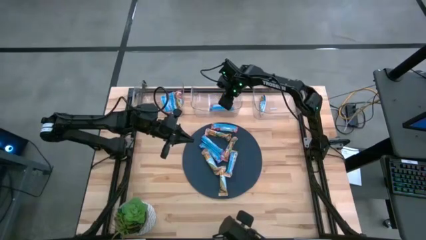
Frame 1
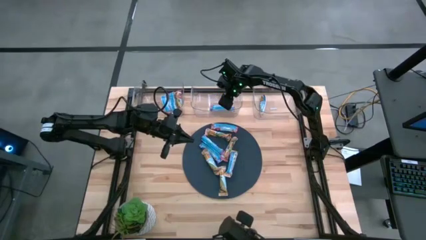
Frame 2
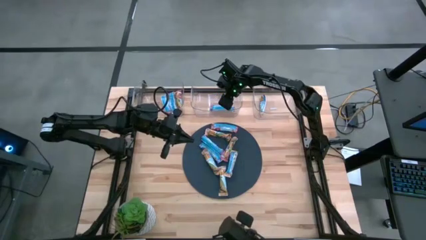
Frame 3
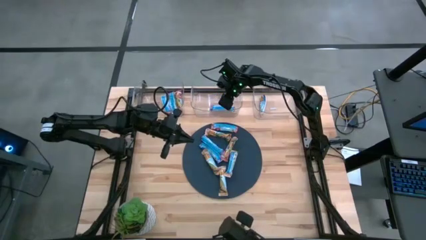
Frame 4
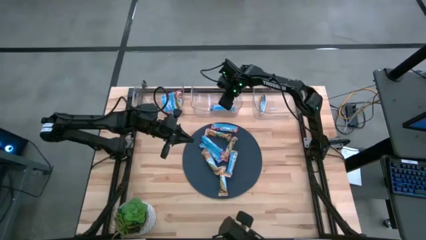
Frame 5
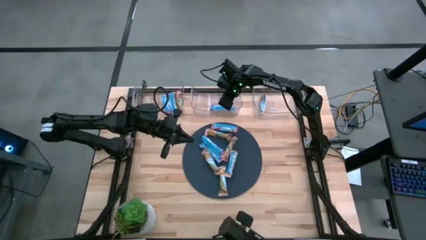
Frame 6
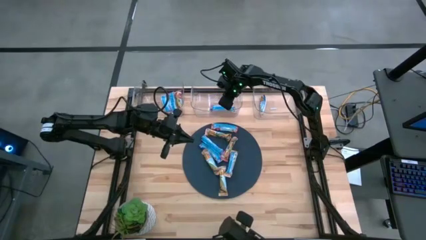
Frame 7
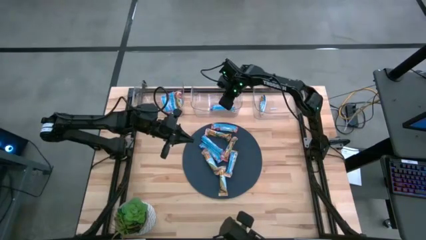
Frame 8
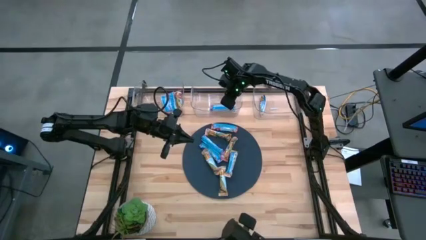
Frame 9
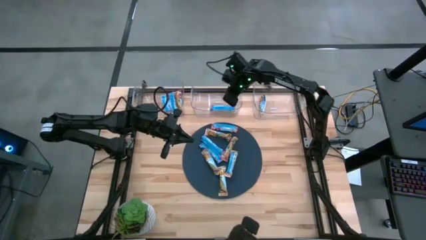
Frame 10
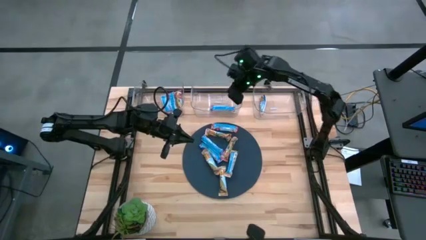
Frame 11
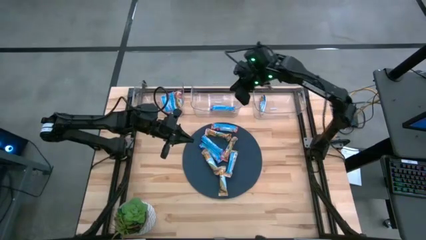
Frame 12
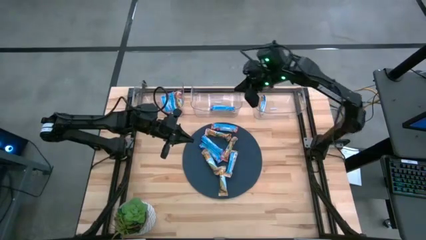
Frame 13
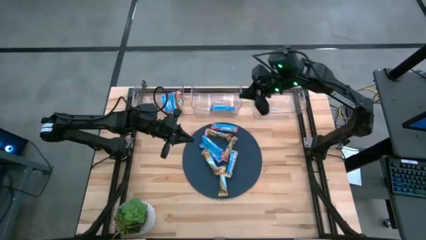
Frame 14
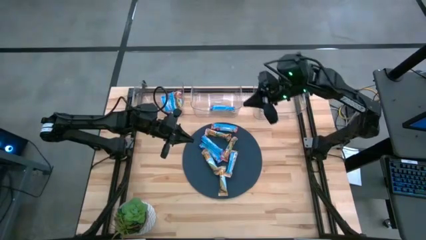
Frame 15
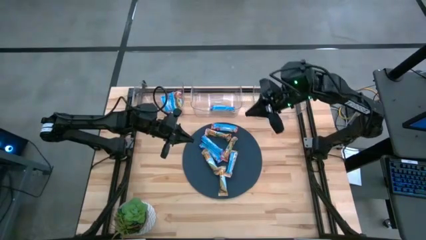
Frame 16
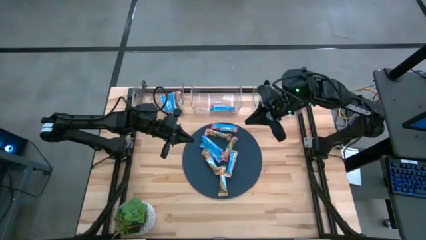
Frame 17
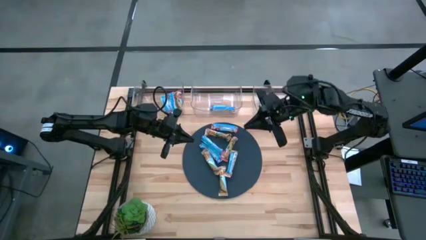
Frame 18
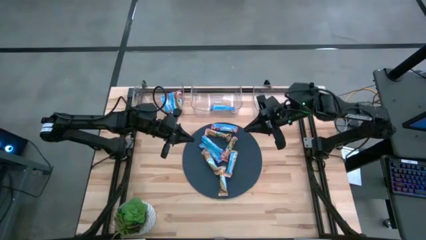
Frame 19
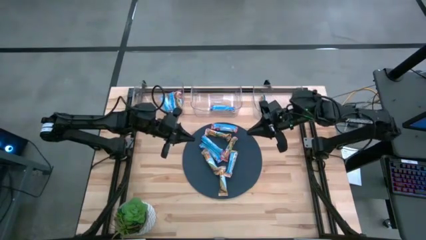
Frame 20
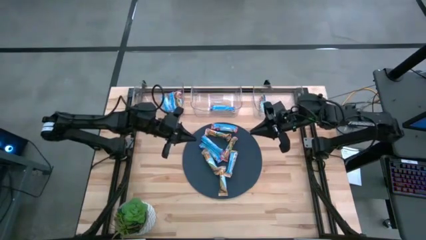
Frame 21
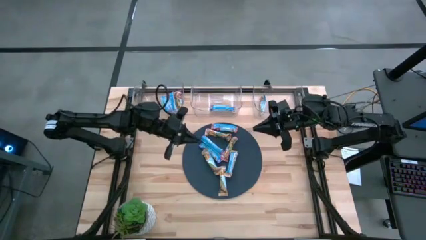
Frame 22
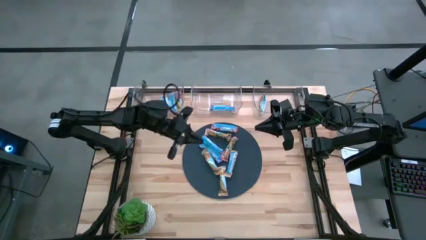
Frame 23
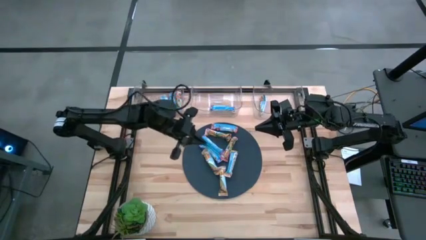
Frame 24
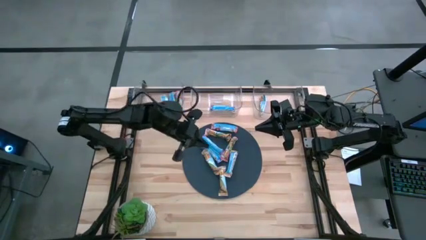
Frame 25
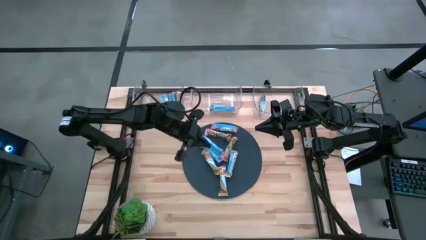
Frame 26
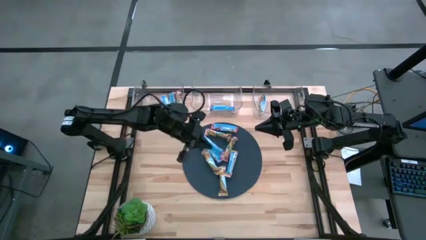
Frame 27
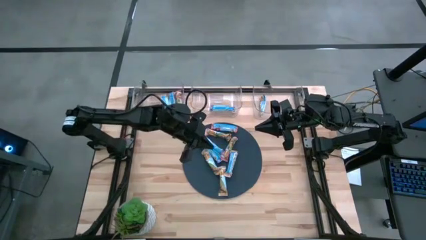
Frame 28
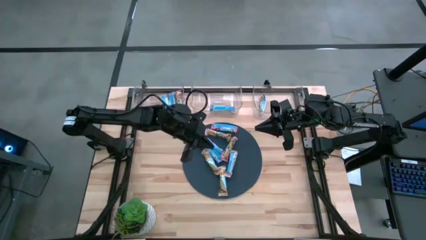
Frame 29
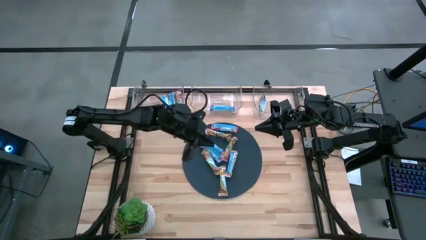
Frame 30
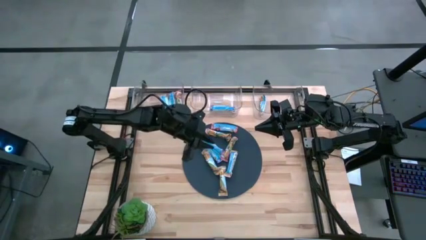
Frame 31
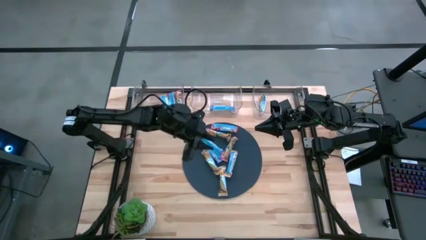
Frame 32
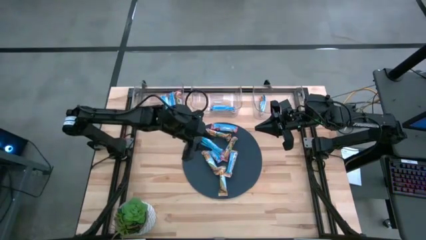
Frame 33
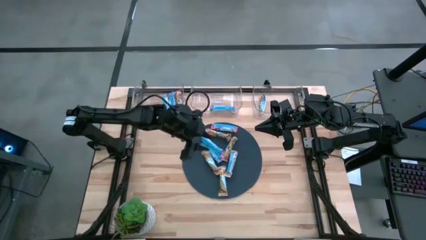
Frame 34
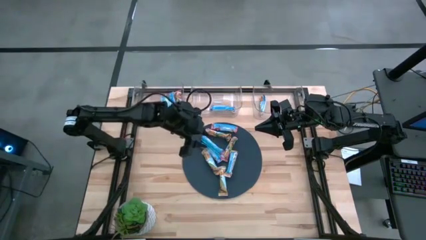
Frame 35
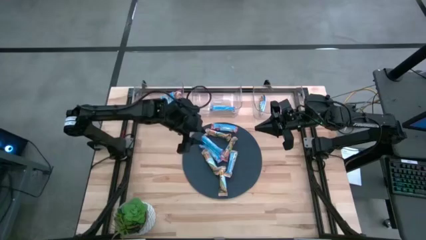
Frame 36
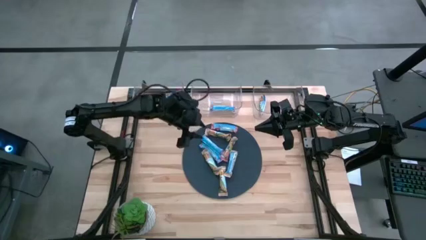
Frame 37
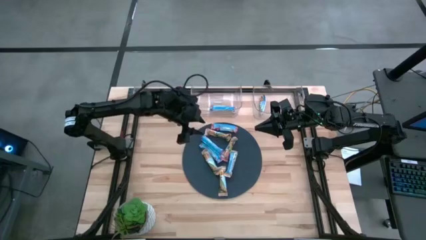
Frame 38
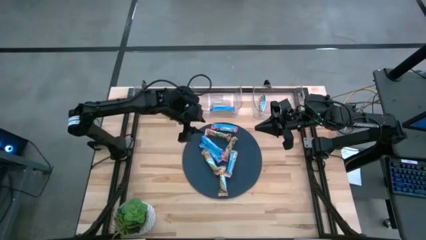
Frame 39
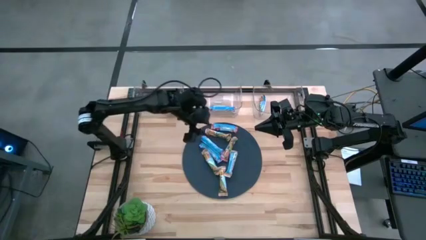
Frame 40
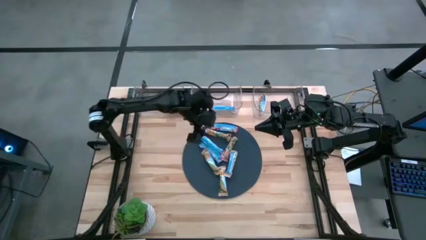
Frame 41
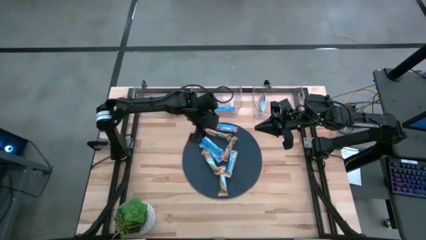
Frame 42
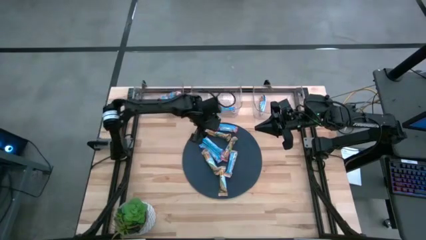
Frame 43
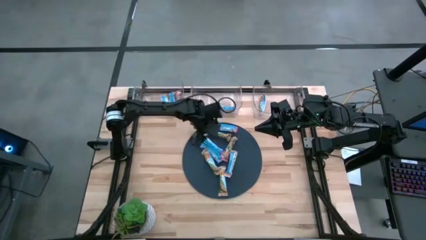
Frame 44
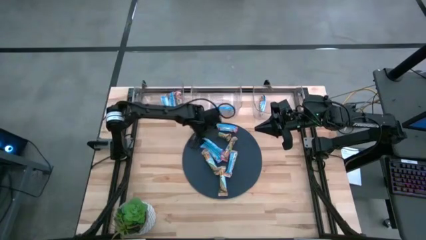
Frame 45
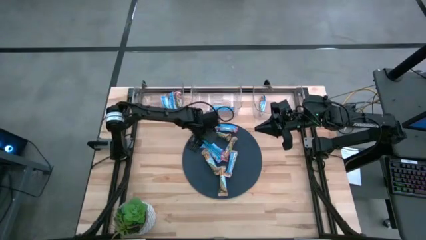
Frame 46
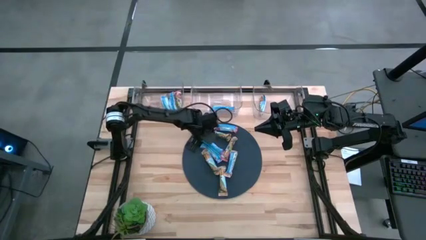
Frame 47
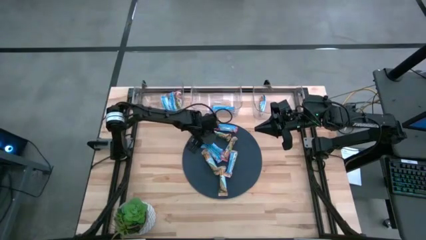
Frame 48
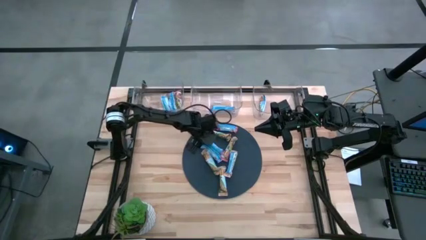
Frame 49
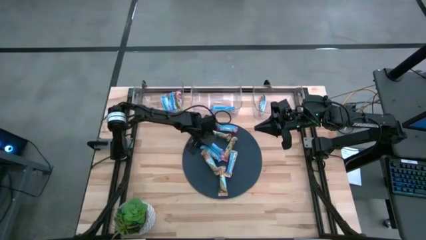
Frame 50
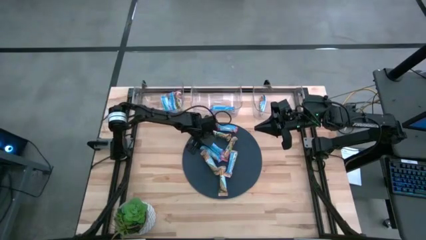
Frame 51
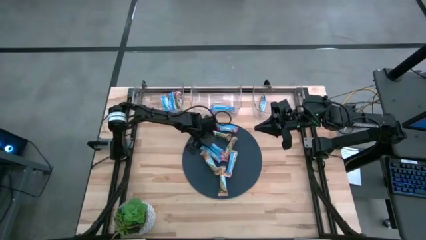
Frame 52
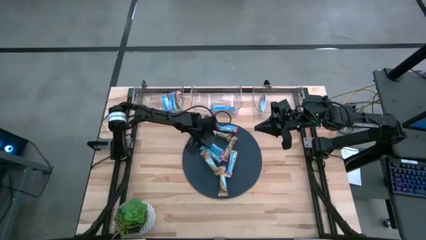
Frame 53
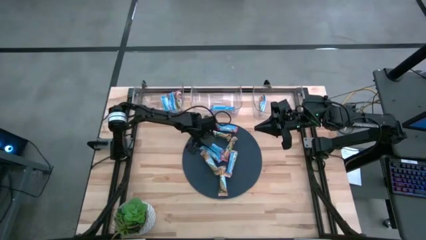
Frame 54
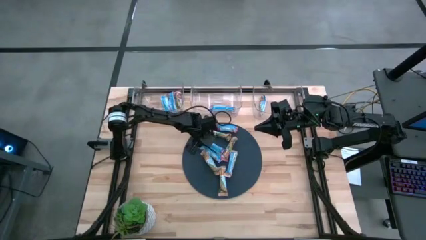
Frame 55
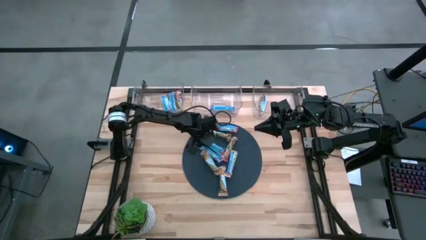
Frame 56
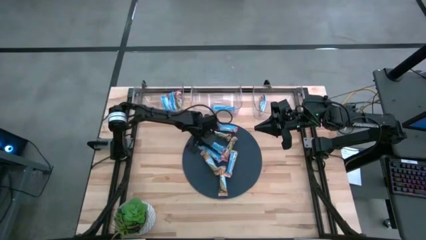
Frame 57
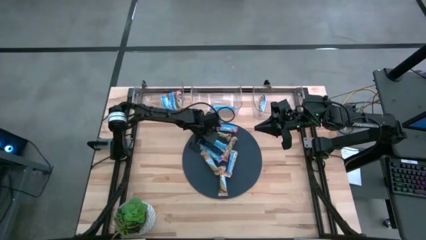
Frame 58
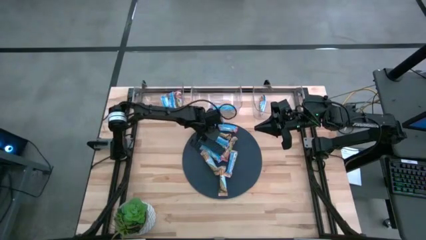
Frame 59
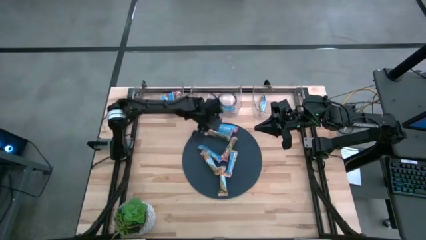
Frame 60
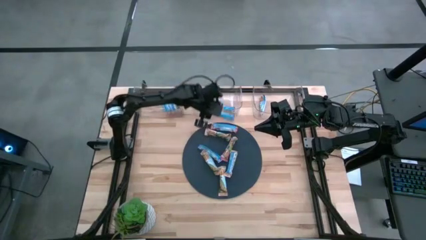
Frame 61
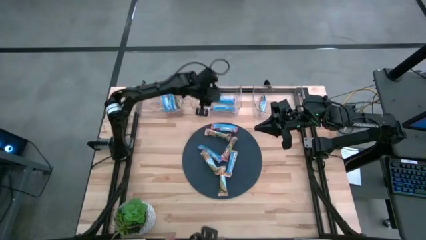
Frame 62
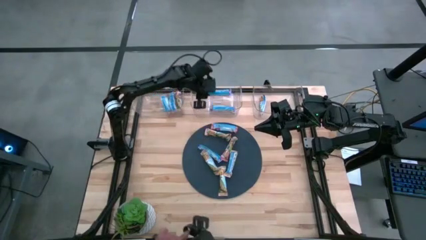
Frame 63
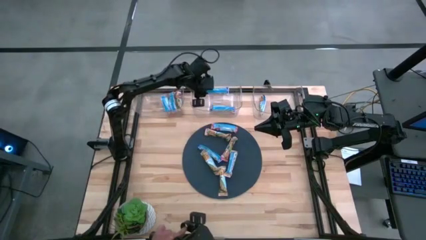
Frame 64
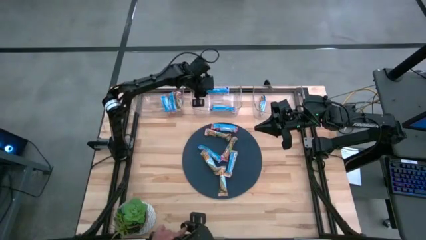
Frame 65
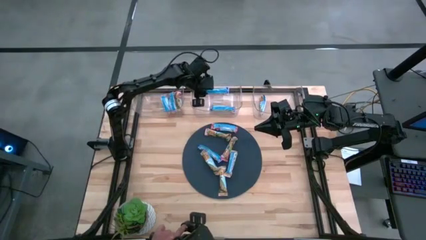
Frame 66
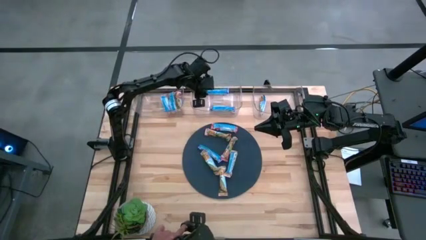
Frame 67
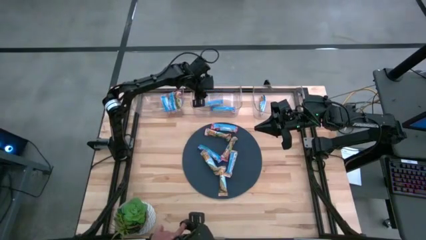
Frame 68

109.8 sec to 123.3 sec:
Task: Pick and place Granola Bars by type
Put the blue granola bar into the middle transparent bin
